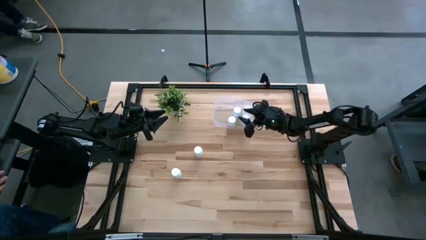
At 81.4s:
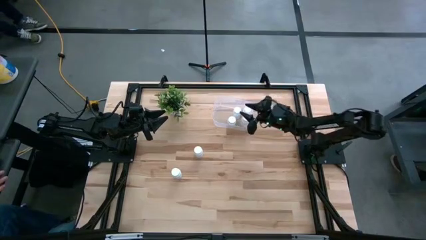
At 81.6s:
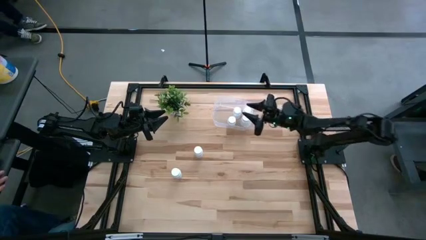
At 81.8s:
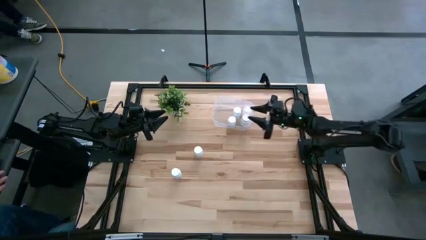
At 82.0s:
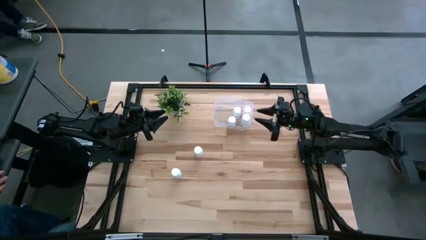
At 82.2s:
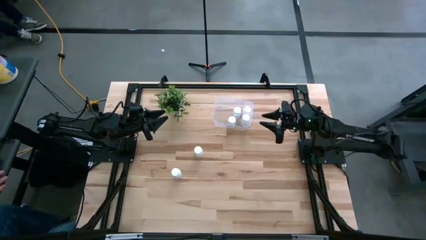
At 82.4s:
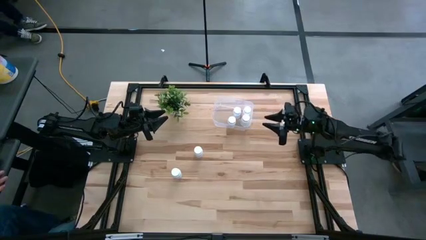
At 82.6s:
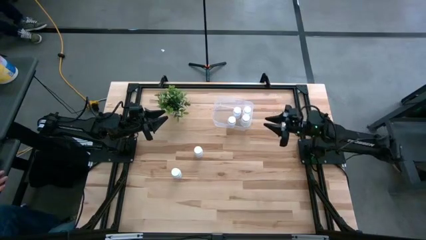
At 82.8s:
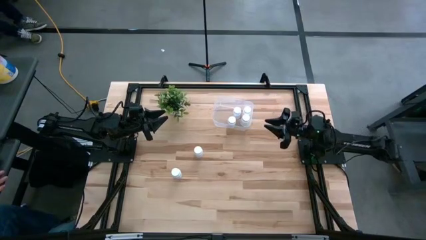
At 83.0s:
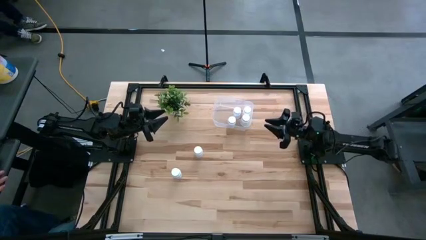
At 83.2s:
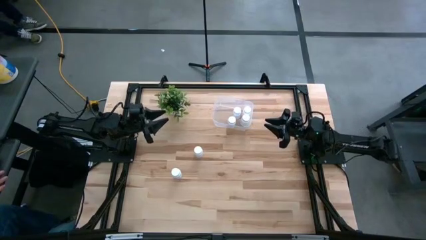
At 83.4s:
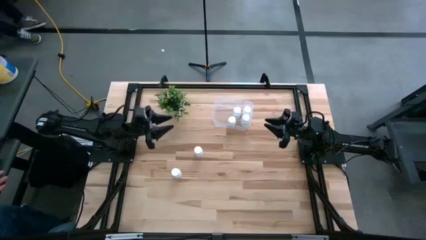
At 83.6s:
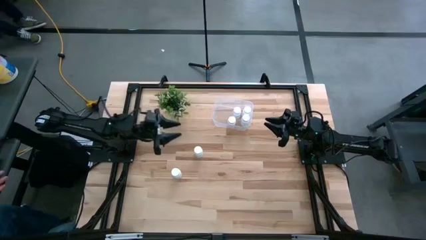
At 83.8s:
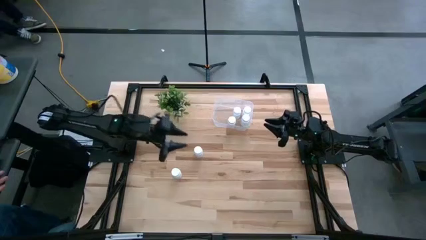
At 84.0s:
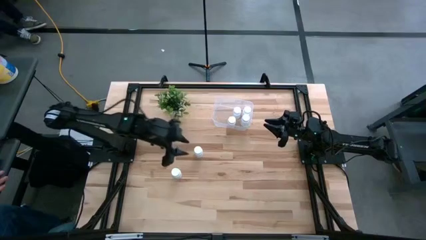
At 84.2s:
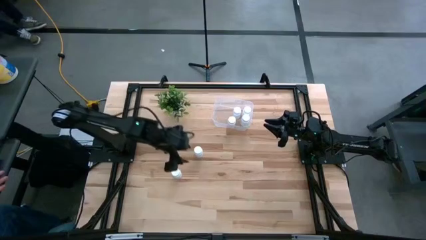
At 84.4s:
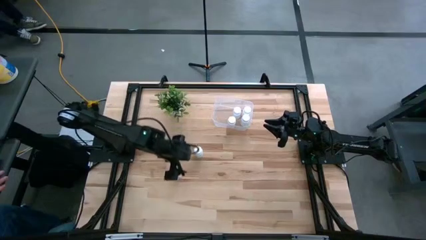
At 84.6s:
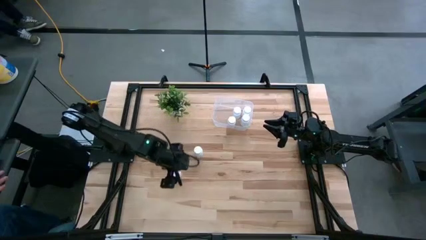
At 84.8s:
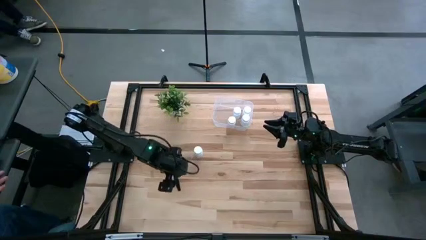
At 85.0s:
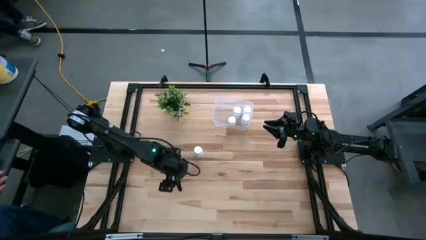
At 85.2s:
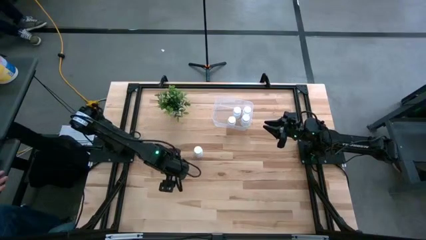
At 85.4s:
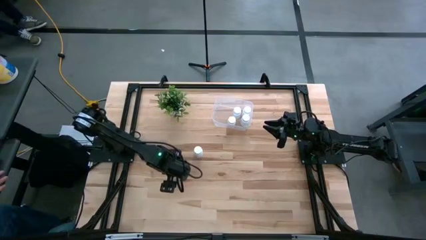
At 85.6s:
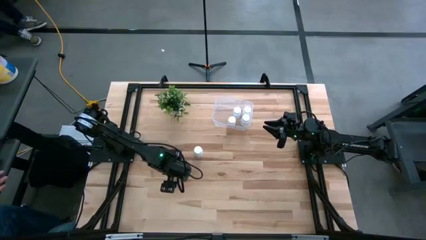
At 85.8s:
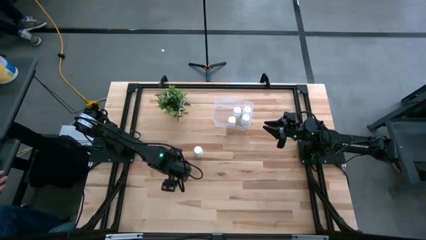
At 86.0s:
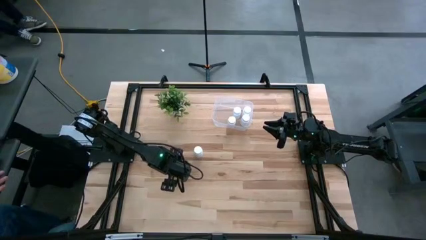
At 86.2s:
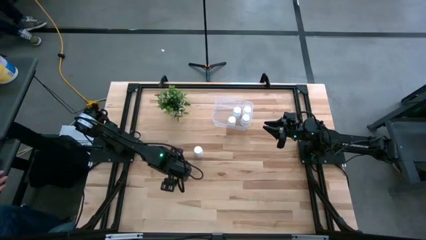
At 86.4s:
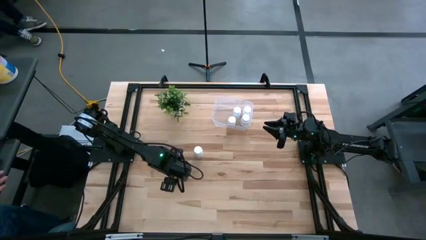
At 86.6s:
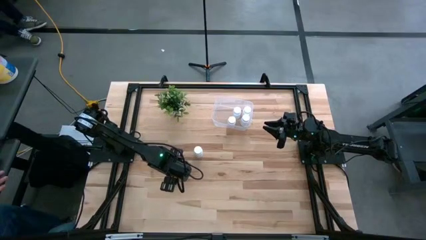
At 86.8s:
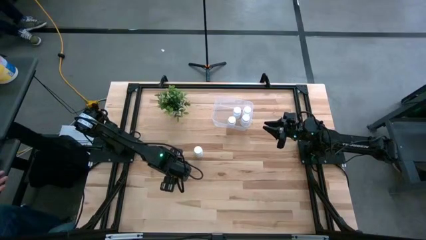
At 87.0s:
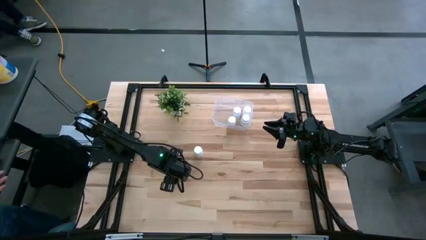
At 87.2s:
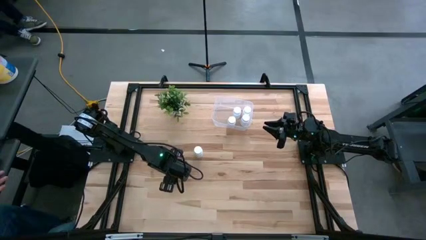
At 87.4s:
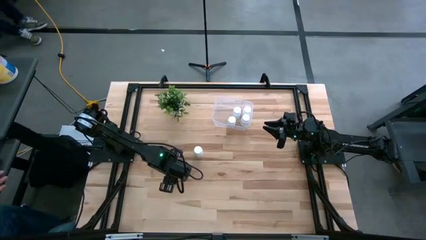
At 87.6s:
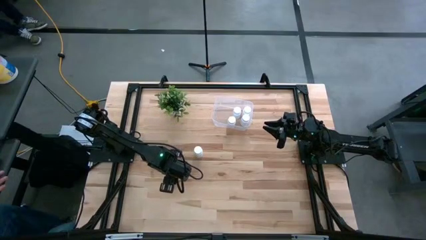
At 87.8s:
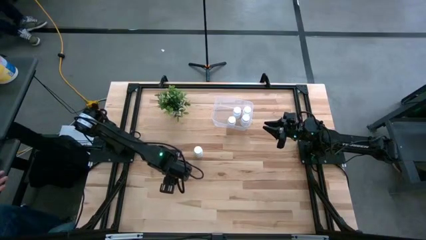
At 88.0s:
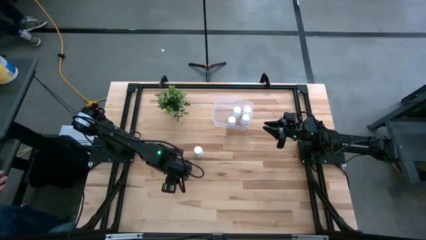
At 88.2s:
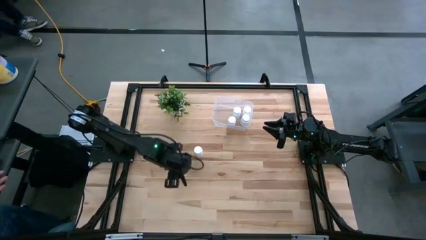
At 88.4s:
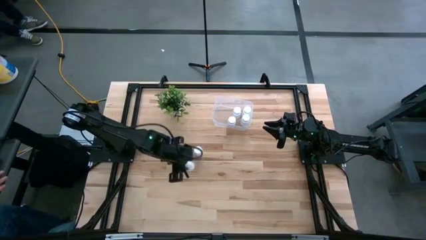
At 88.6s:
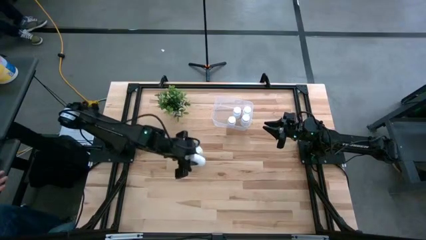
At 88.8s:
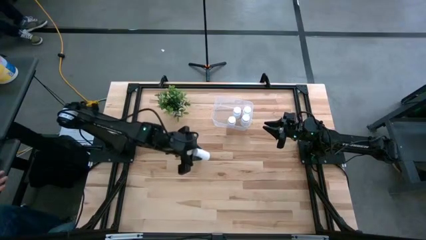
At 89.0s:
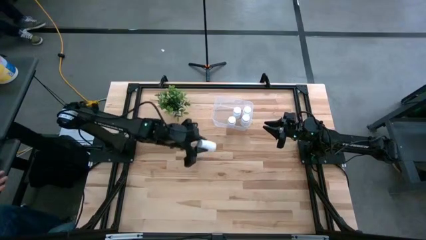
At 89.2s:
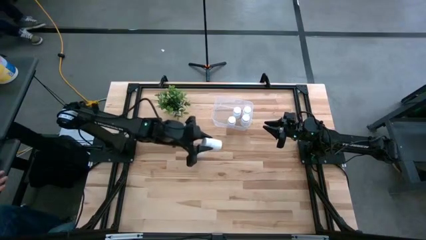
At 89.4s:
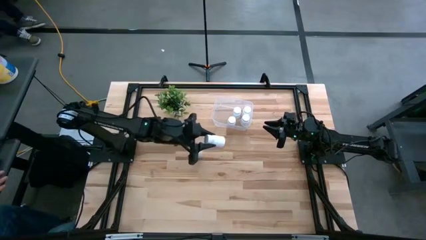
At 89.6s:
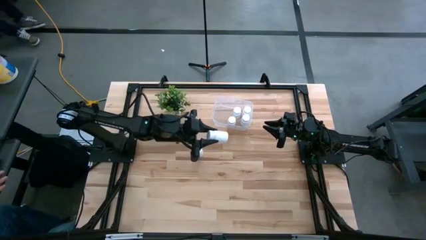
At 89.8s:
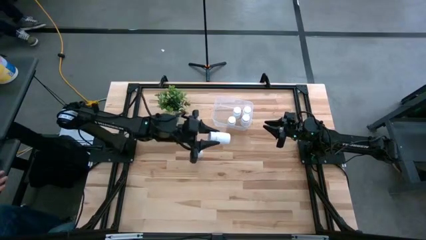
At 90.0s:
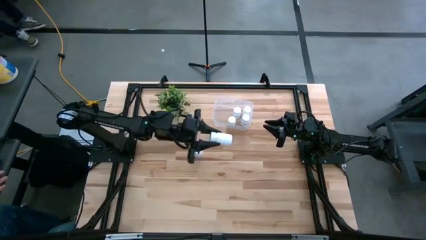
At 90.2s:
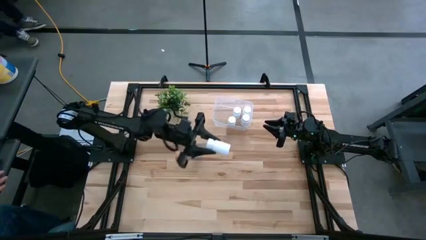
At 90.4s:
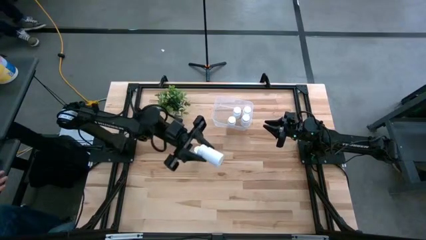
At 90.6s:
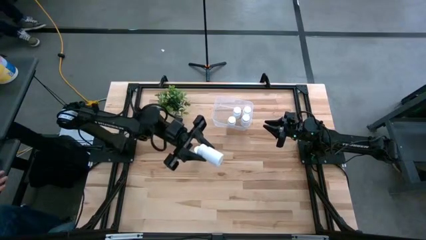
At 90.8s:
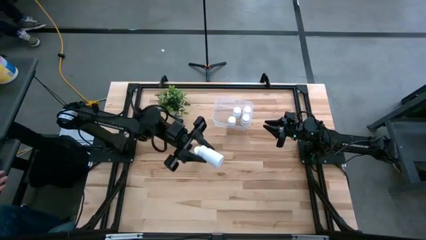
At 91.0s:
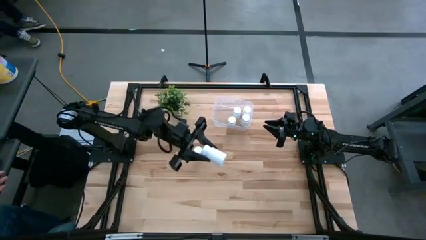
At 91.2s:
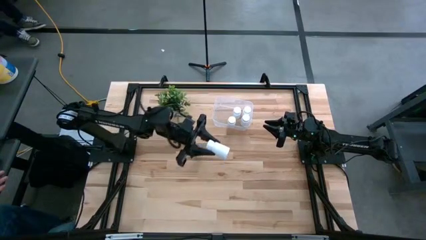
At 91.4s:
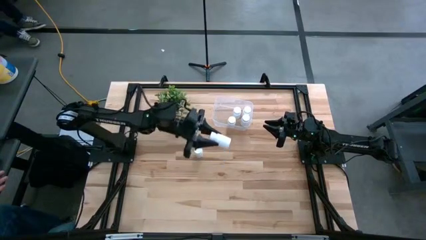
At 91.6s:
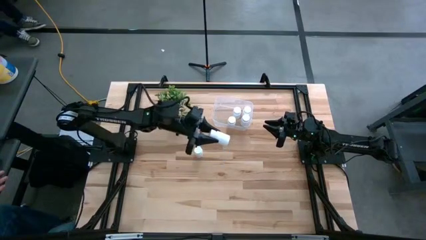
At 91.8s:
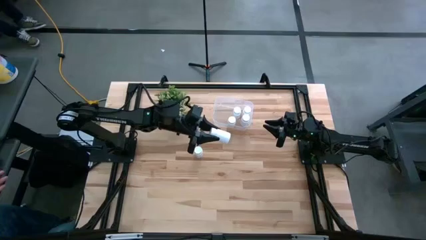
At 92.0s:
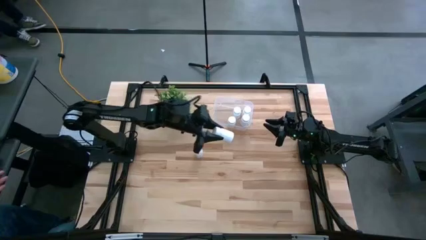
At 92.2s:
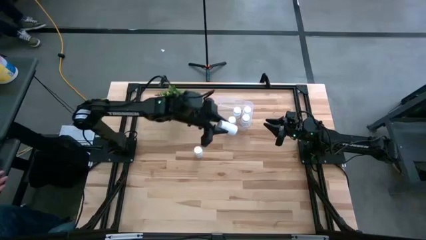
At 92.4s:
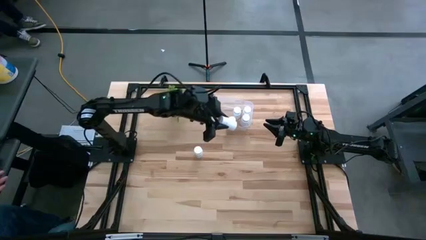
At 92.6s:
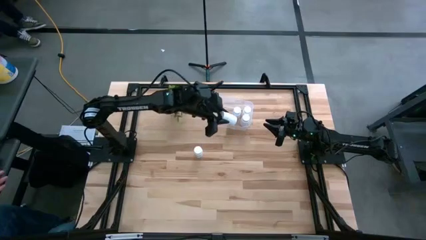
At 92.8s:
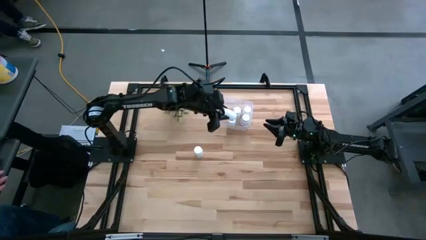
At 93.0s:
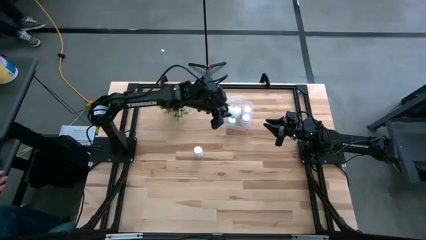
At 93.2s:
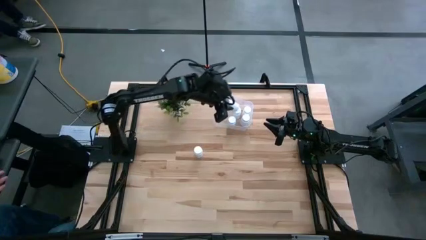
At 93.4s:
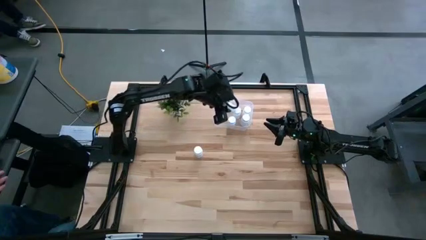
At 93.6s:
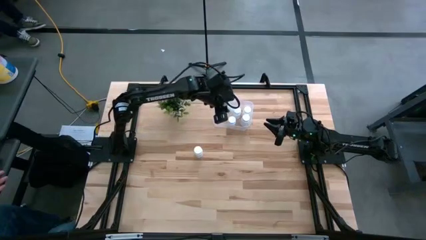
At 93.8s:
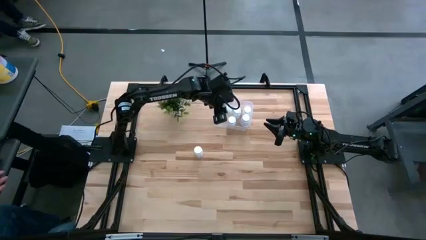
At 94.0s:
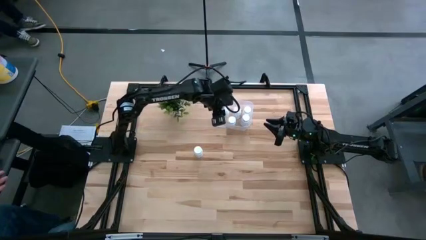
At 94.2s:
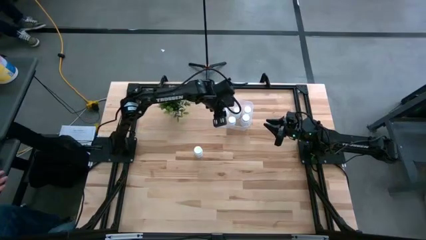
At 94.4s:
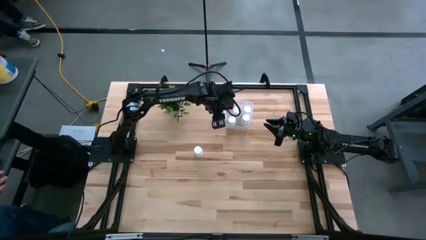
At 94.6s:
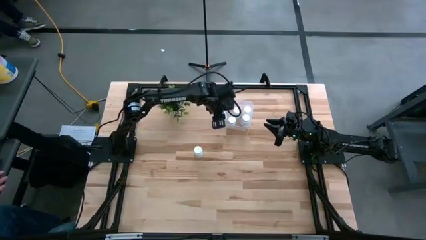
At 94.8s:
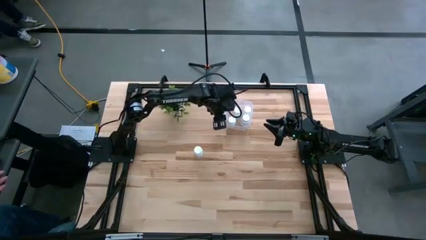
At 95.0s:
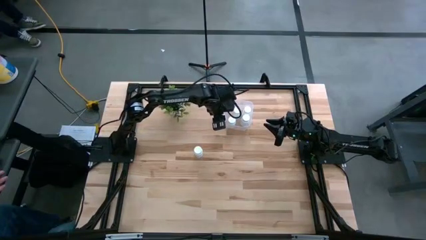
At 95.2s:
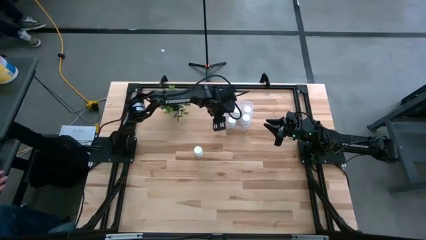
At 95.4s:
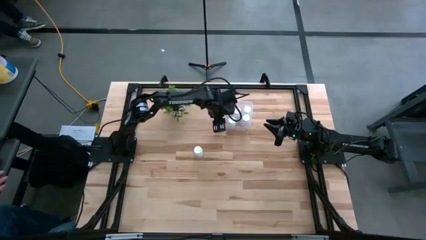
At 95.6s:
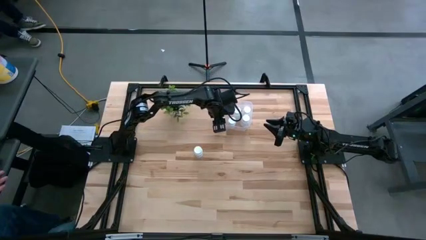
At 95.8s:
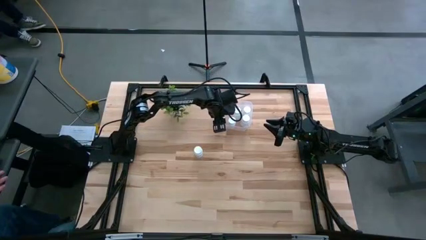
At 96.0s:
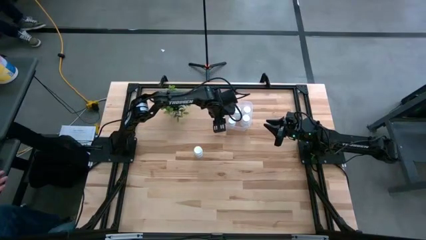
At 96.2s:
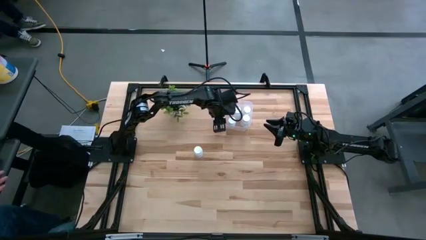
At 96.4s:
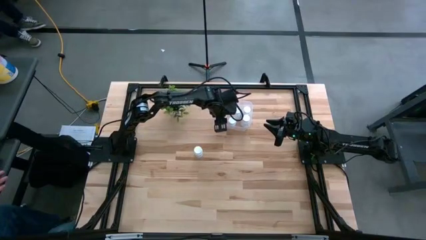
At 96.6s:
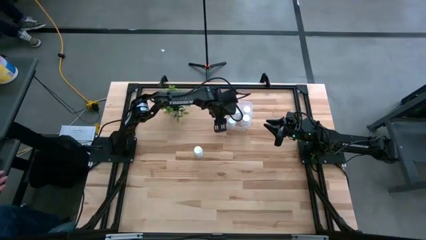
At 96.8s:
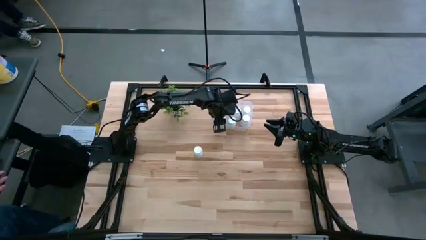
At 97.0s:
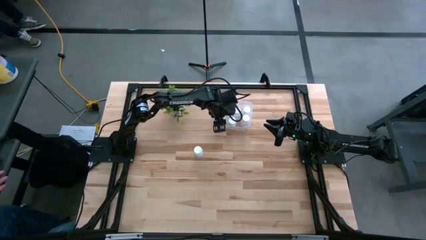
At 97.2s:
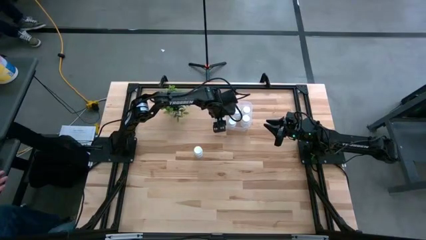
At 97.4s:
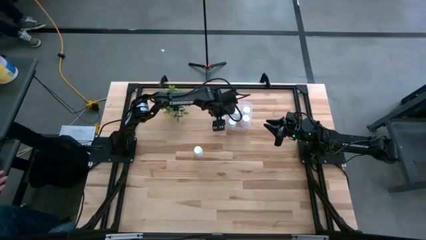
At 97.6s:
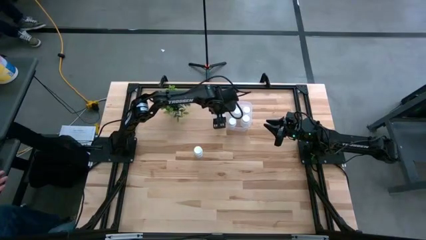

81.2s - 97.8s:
Task: Pick and place pill bottles into a basket
Put the white pill bottle into the transparent container
